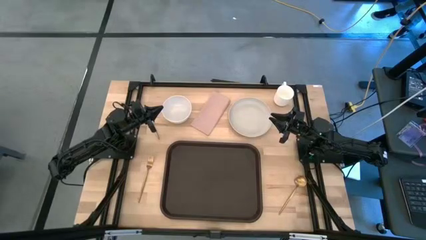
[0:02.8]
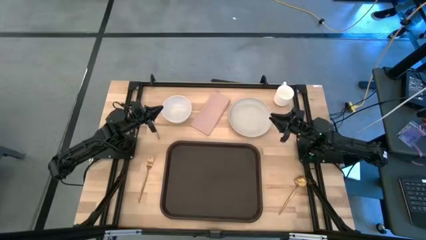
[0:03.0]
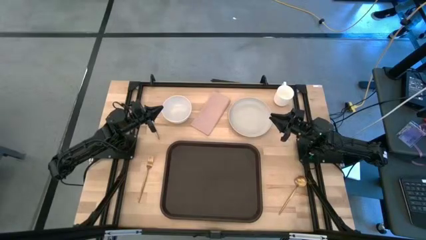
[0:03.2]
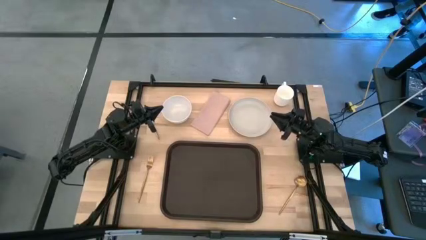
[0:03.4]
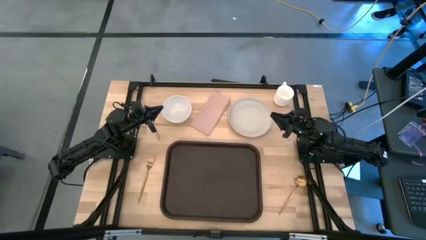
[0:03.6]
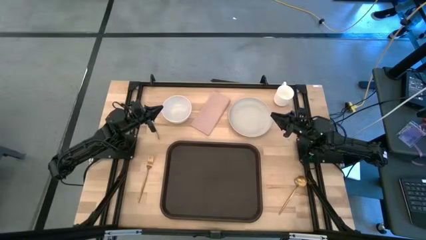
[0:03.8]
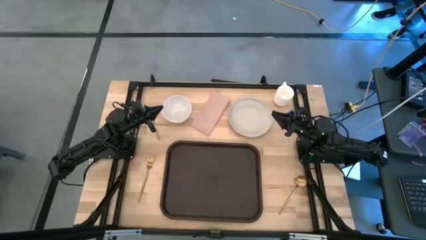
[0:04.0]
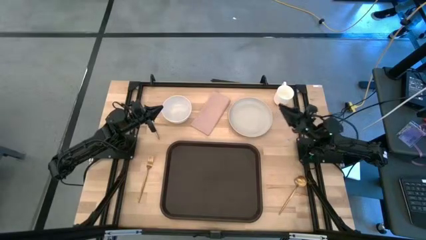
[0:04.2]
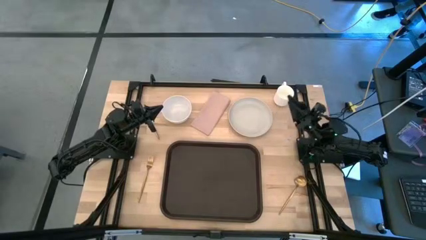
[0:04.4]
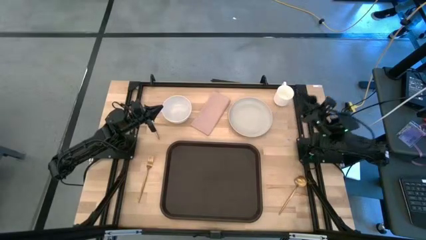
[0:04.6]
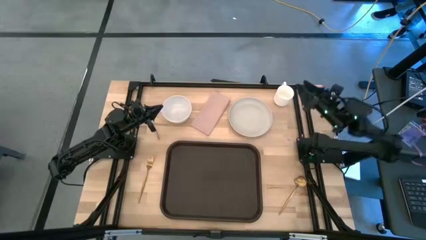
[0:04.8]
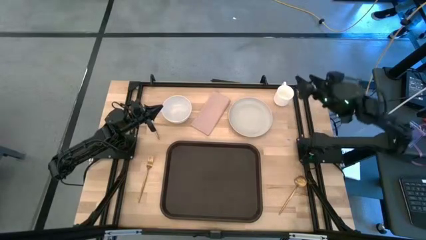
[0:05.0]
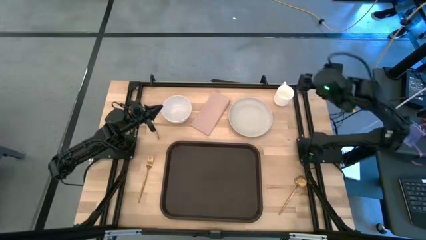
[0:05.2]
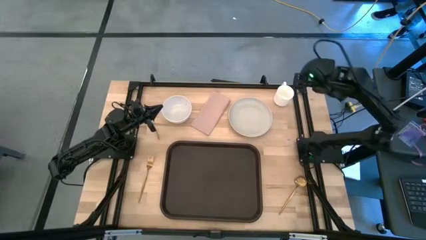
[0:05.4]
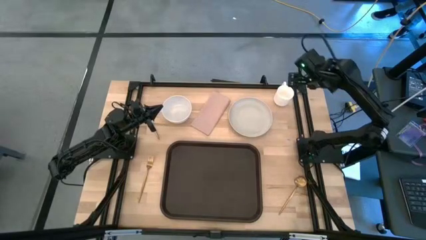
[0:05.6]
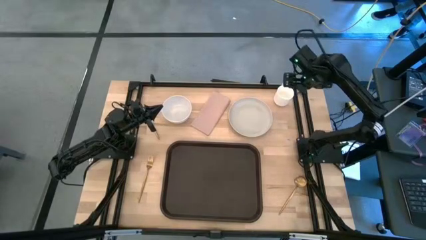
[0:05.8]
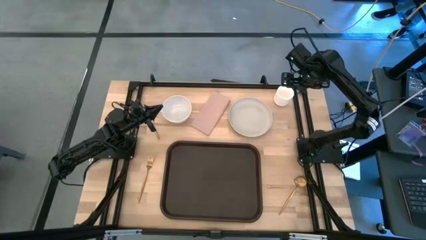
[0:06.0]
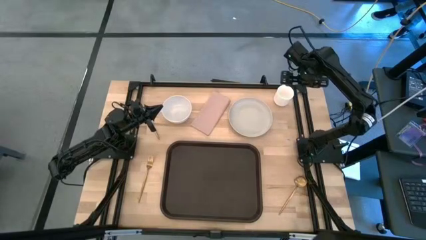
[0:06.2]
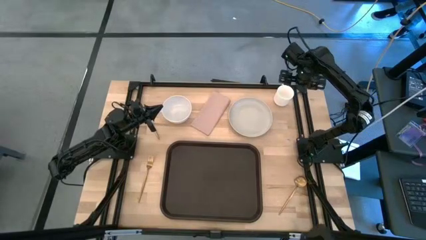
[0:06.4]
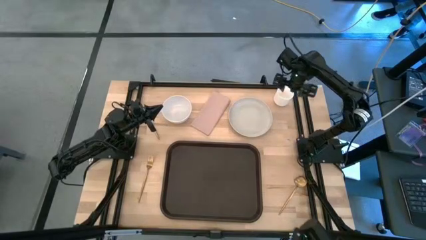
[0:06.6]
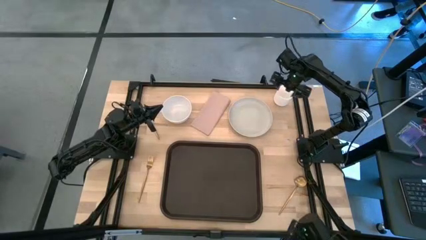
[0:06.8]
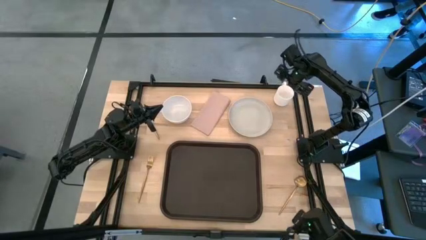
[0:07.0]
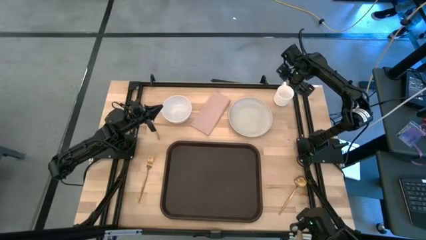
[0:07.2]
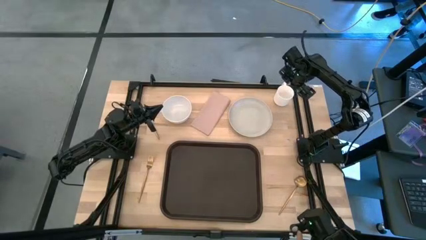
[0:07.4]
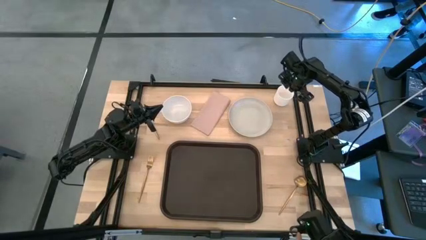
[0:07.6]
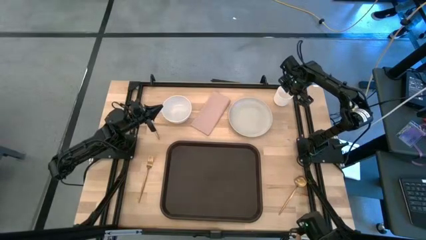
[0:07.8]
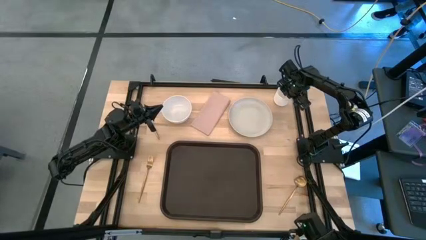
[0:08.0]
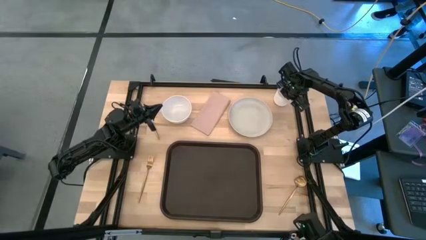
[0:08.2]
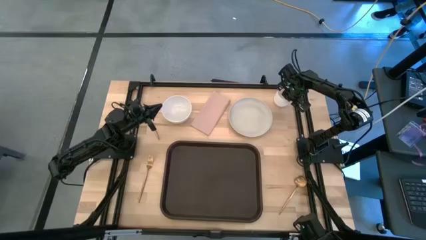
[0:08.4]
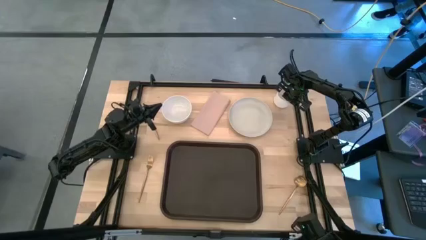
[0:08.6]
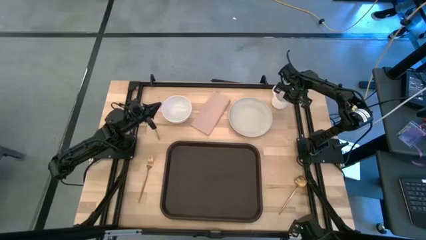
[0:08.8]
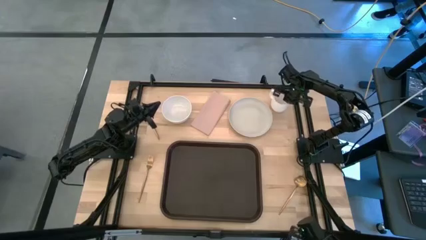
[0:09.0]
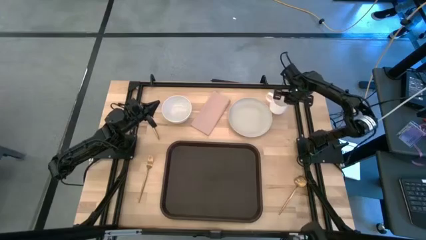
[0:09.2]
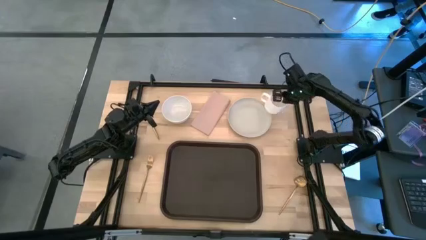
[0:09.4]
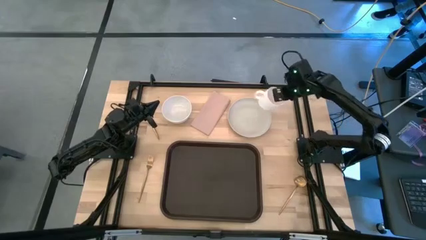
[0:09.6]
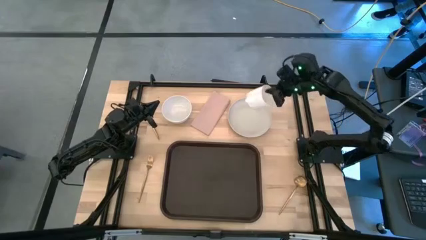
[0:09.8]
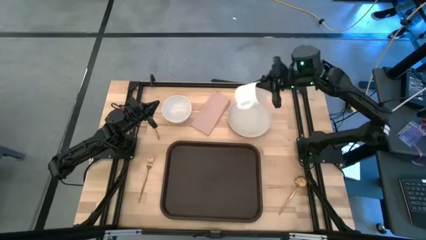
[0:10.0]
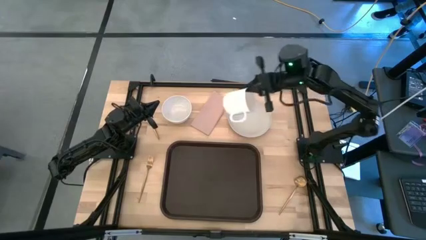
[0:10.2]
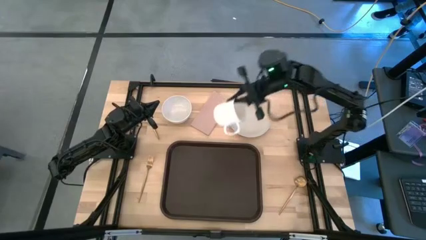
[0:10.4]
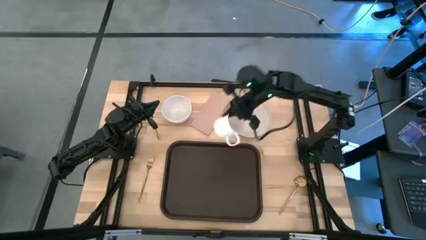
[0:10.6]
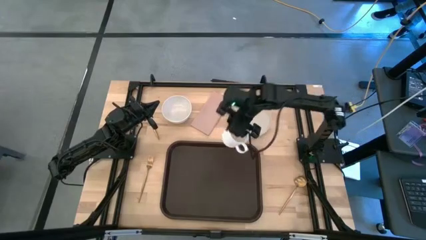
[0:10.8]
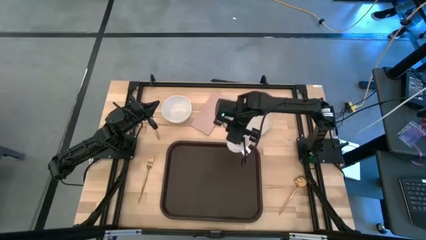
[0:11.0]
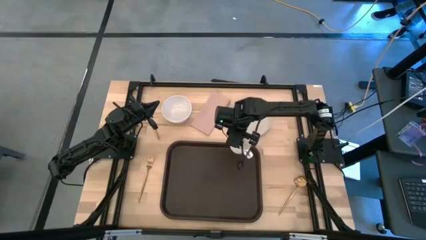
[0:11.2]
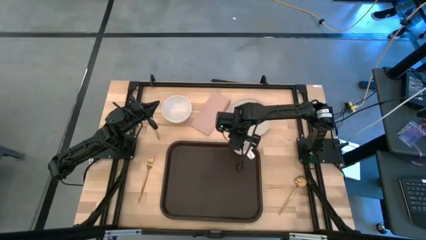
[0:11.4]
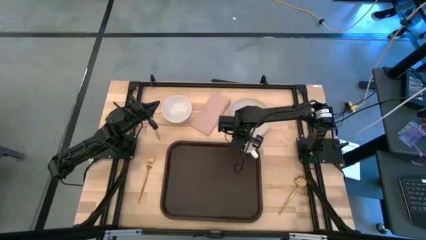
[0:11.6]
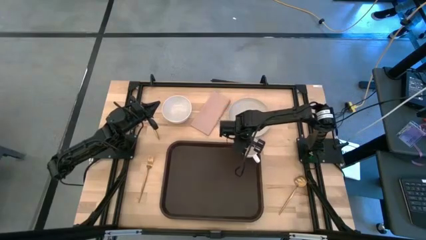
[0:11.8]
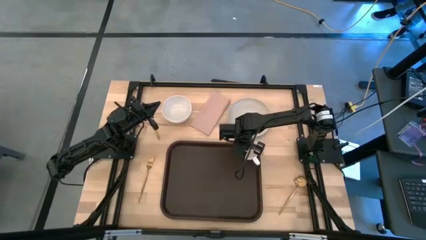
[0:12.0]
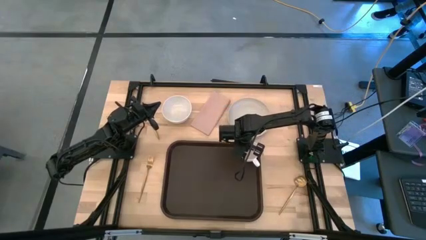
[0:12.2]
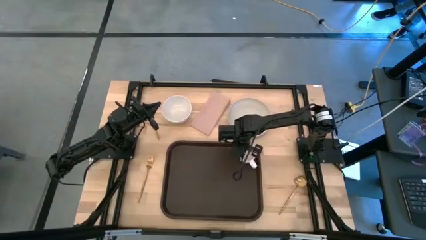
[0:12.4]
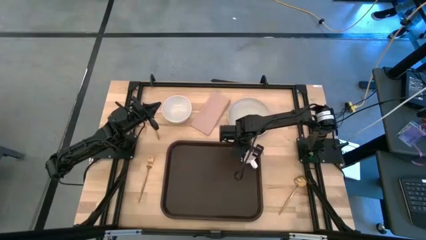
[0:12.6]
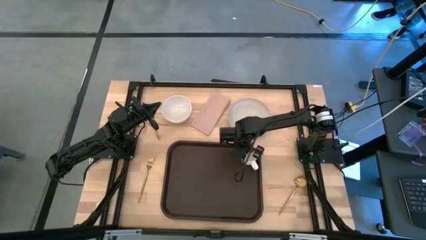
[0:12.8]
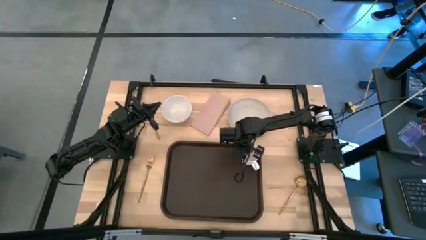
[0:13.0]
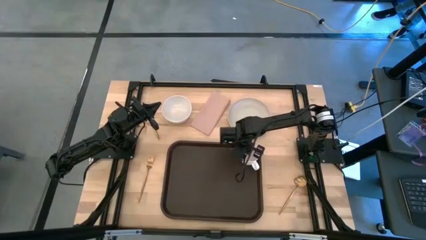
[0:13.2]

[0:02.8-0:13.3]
Task: Set up tray
Put the white mug in the top right corner of the brown serving tray

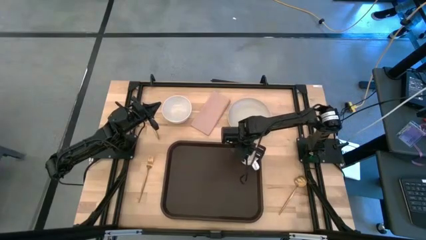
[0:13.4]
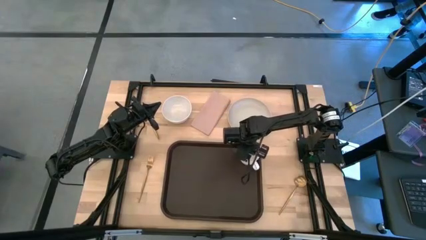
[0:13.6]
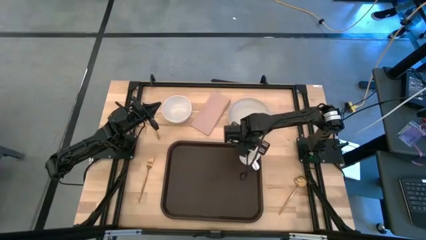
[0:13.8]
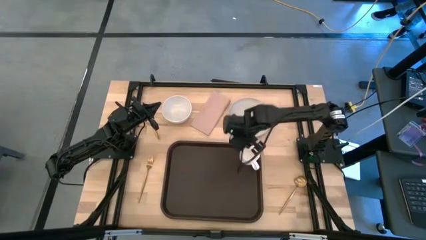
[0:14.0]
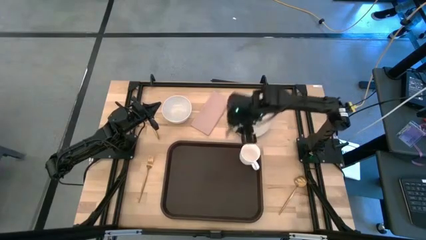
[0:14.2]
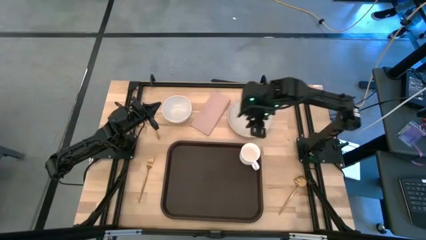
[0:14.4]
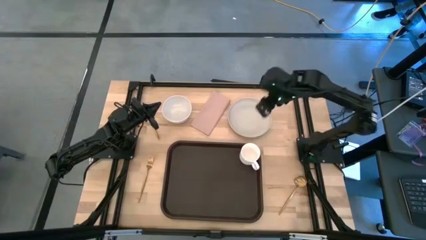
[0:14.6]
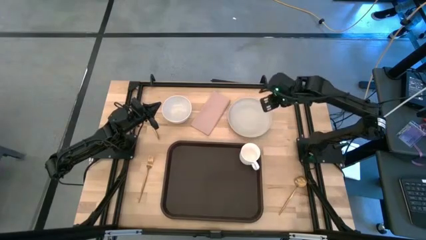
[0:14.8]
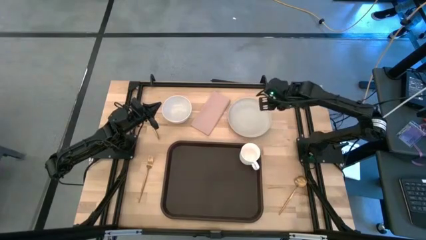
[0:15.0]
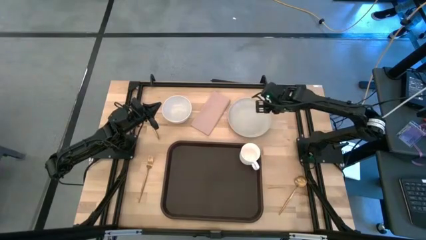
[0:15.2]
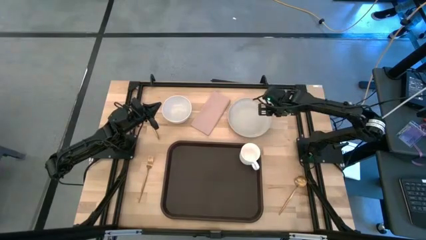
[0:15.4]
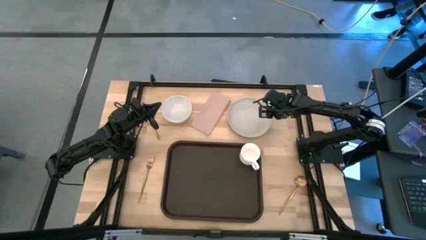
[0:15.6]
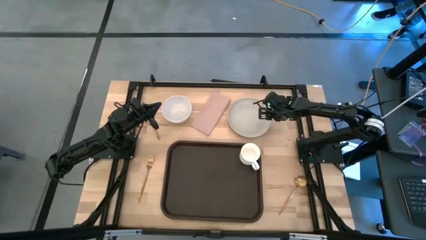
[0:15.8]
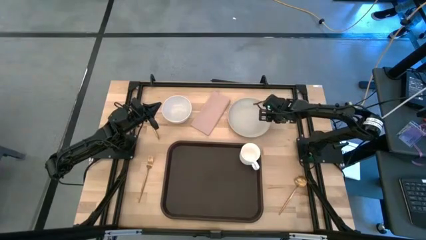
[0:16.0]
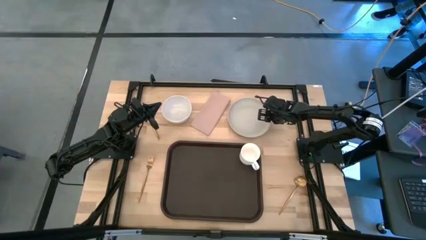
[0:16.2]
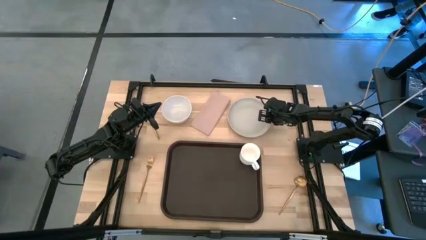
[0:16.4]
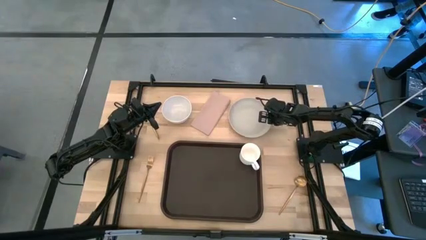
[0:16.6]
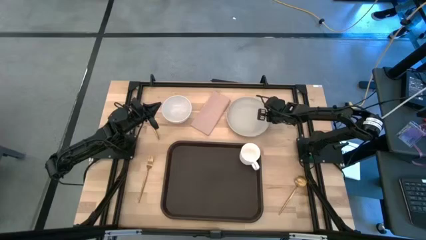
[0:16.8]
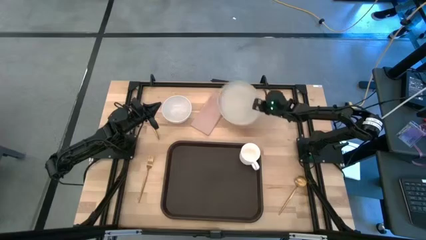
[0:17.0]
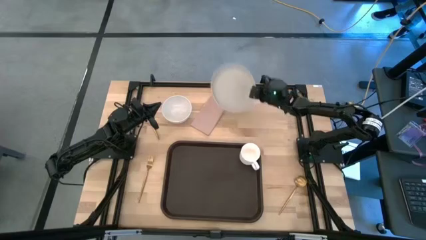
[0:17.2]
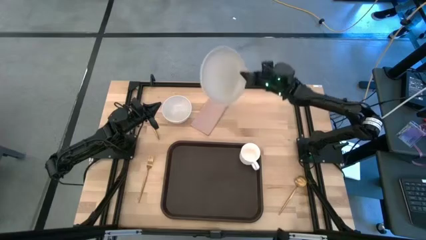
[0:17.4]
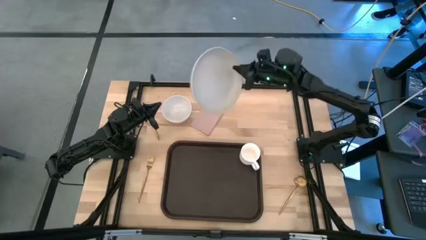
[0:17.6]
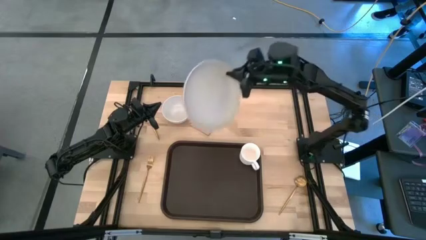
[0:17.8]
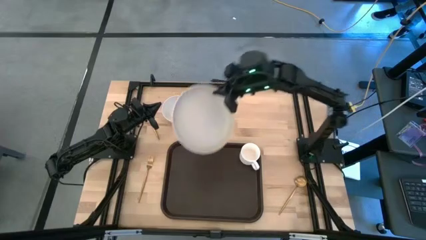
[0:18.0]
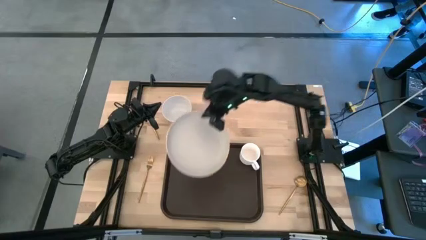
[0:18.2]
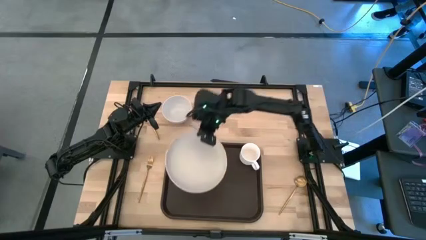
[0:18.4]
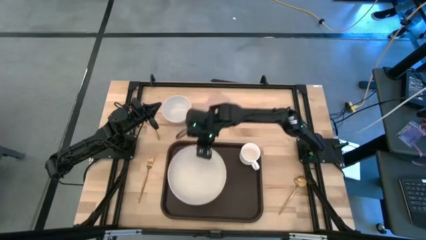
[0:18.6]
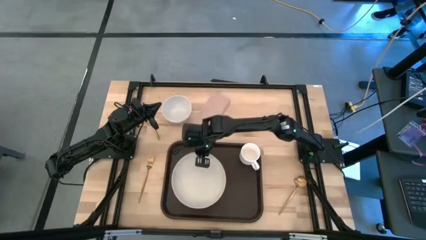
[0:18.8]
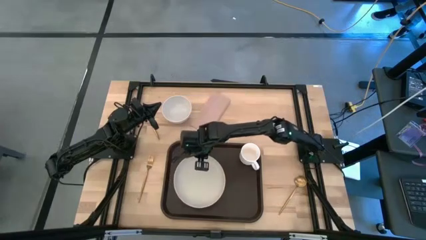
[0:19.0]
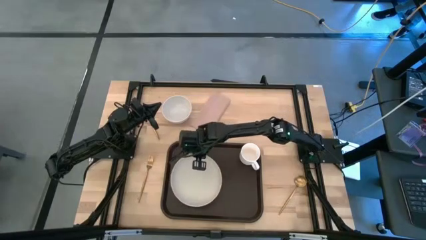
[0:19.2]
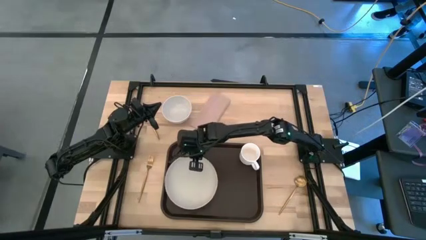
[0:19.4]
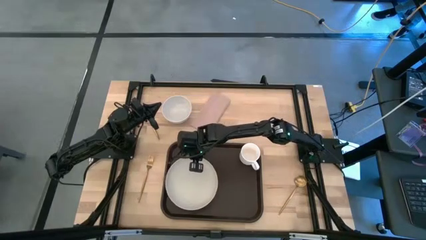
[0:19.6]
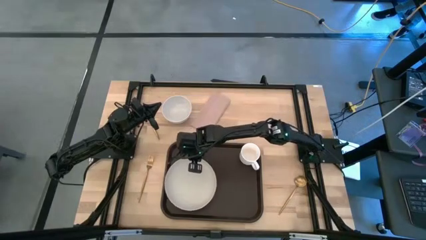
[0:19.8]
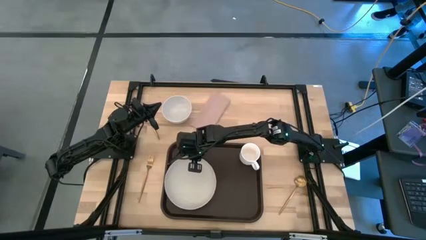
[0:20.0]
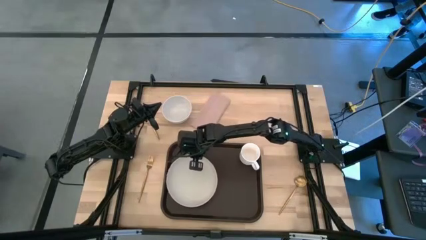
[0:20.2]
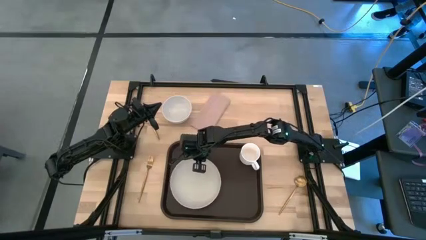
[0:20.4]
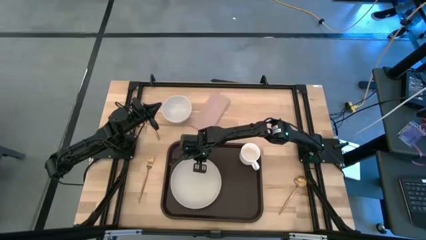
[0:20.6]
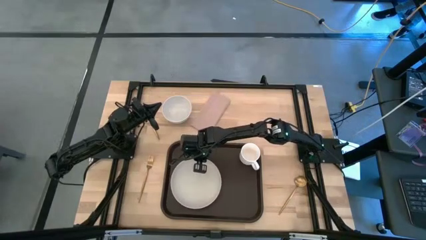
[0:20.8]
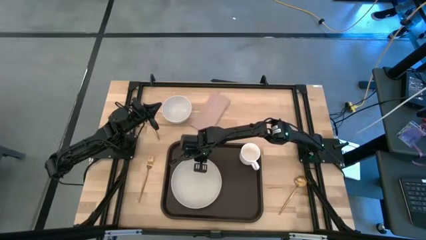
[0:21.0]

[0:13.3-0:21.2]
Put the white plate to the left of the white mug on the brown serving tray
